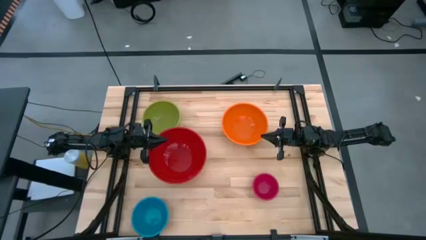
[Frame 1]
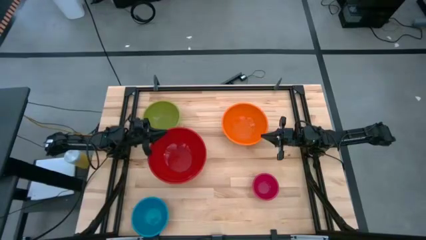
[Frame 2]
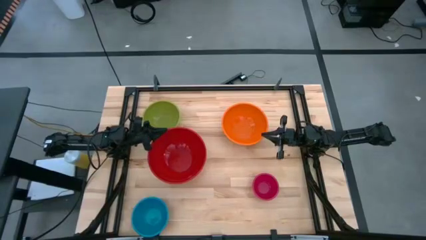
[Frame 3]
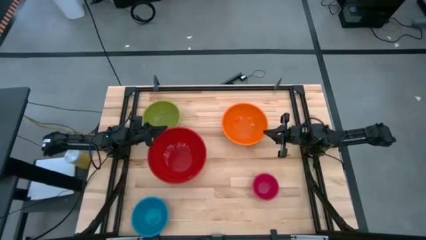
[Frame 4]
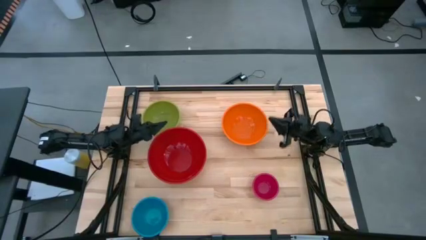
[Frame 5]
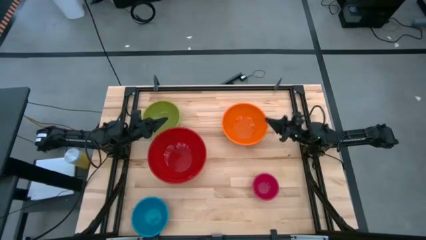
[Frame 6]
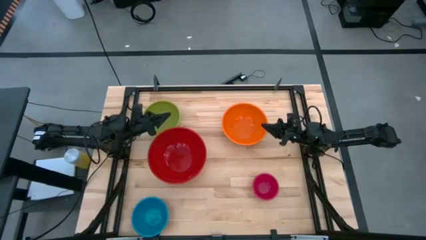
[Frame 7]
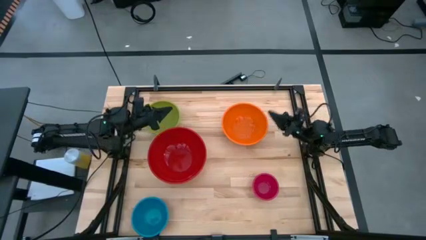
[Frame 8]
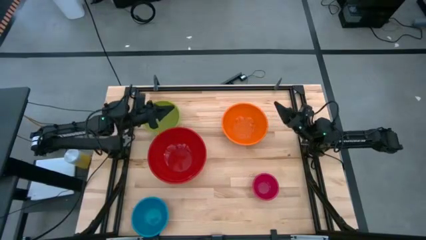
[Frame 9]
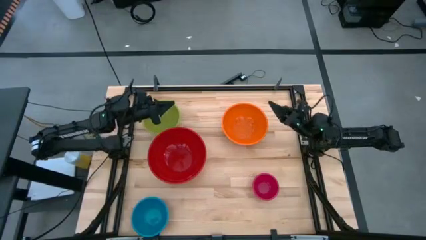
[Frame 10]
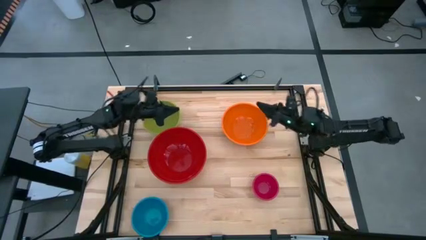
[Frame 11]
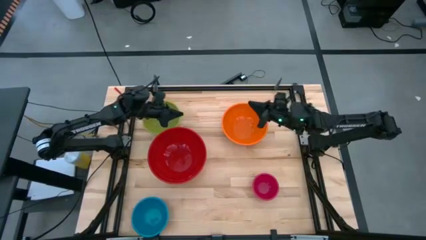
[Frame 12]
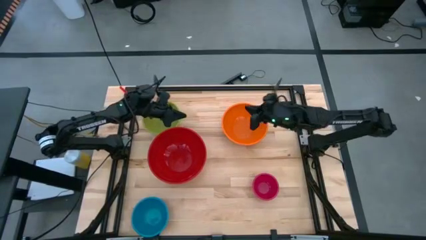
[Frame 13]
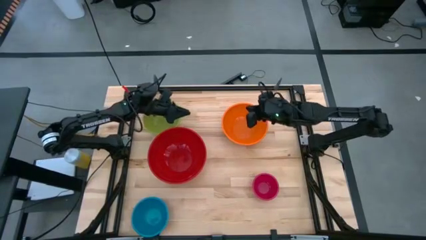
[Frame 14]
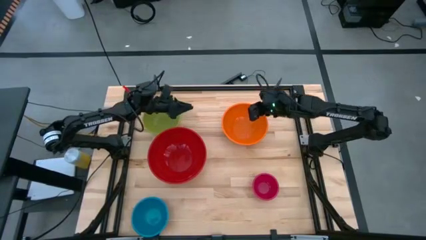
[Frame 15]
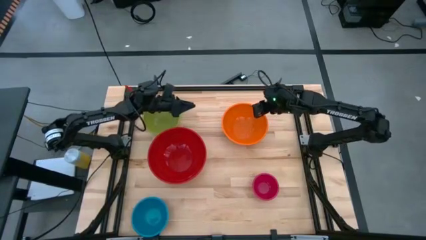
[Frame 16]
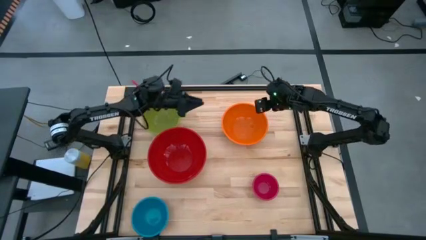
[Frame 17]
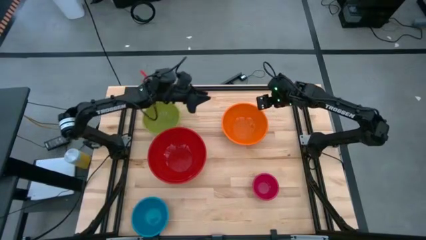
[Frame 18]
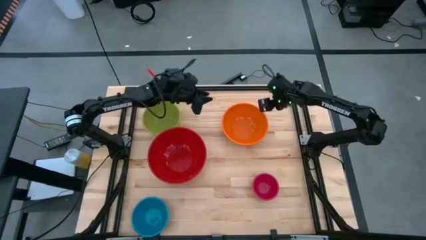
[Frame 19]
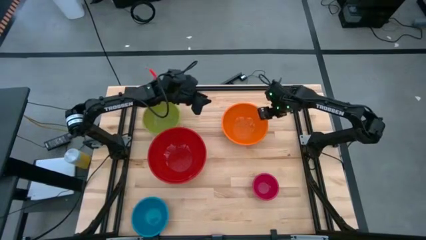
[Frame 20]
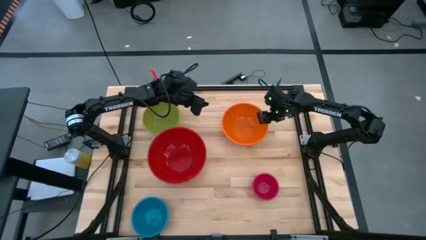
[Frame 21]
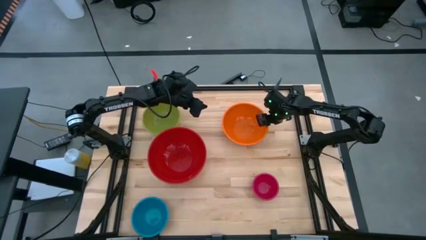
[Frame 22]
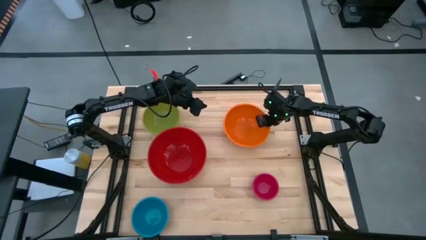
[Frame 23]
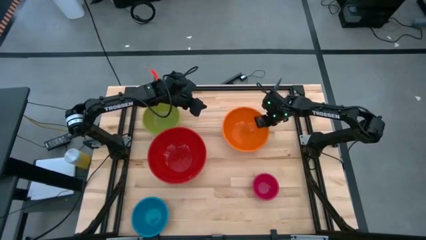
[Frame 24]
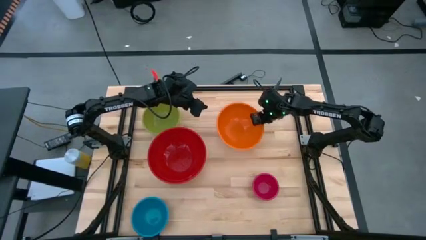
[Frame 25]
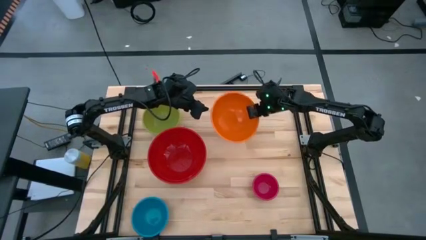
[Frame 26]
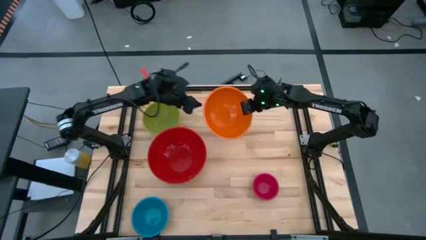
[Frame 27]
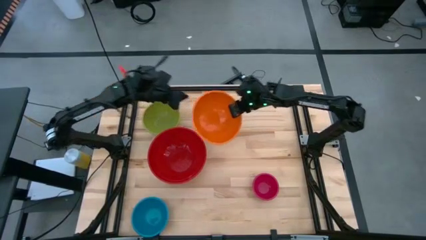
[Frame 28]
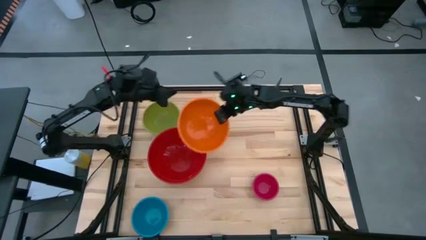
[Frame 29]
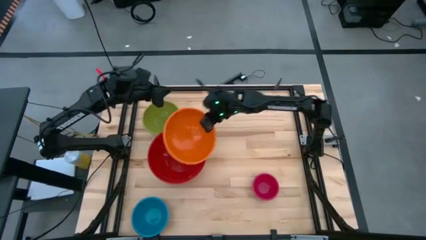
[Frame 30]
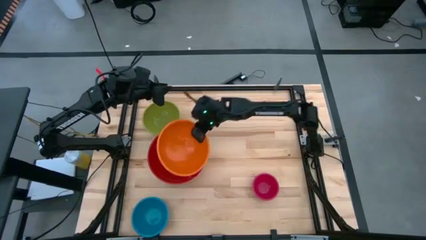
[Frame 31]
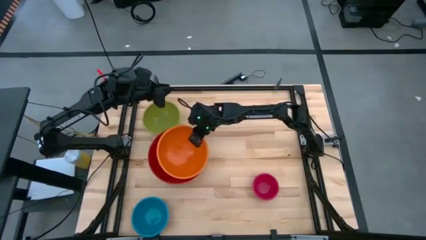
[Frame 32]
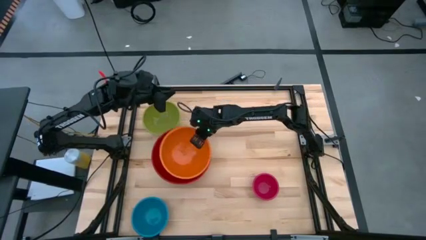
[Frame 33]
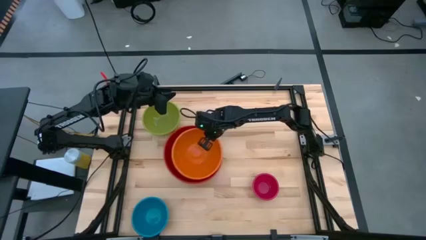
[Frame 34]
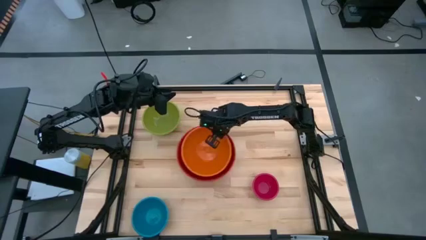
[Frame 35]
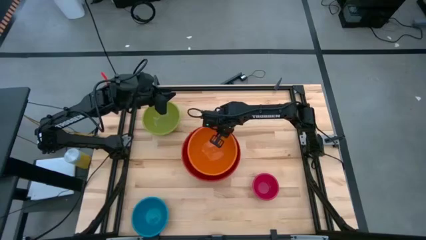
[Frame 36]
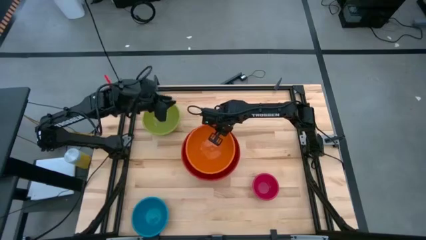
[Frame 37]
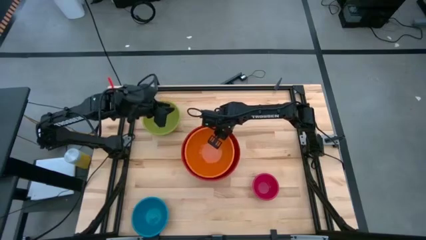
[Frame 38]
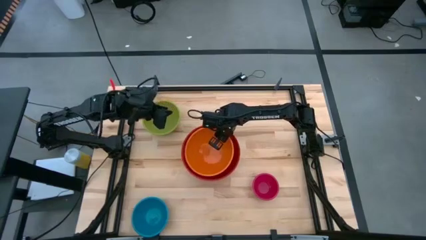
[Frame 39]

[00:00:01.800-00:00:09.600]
Stack the orange bowl on top of the red bowl

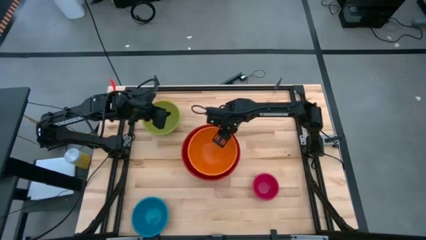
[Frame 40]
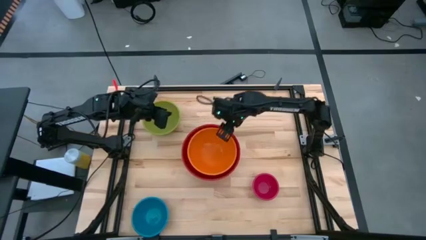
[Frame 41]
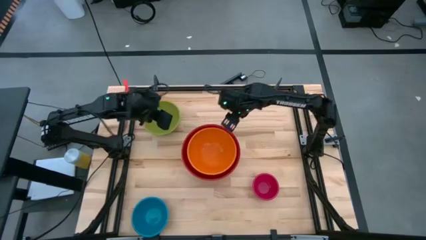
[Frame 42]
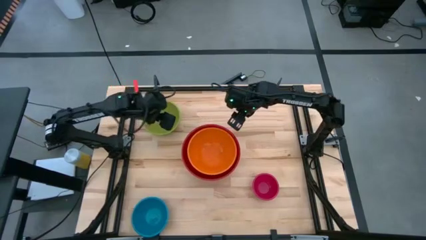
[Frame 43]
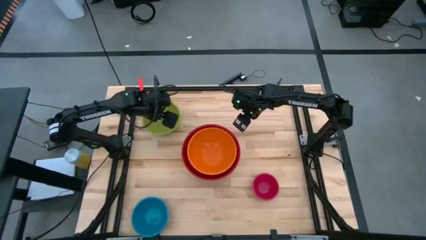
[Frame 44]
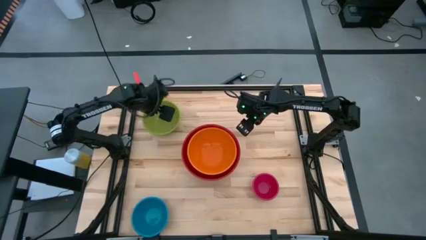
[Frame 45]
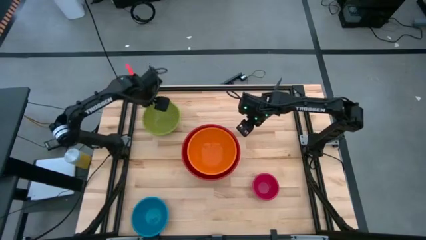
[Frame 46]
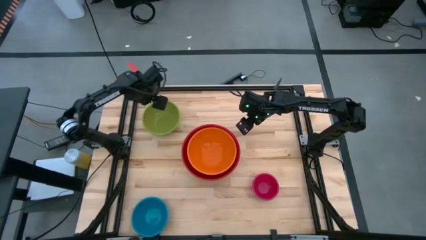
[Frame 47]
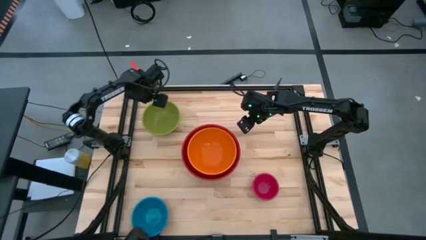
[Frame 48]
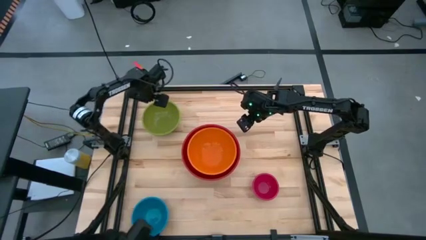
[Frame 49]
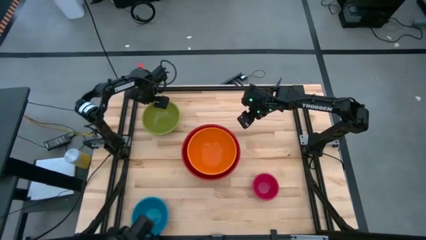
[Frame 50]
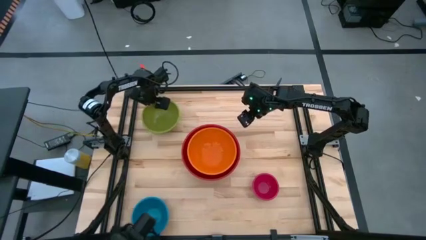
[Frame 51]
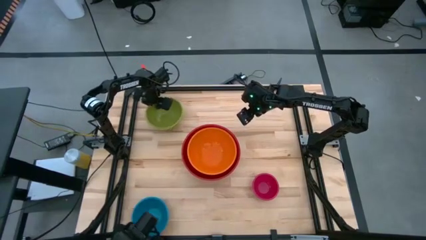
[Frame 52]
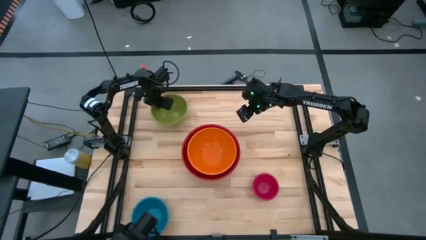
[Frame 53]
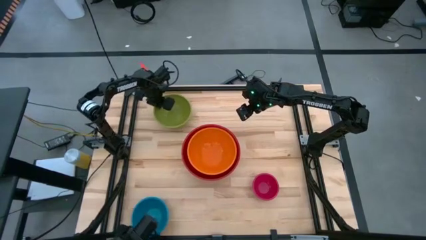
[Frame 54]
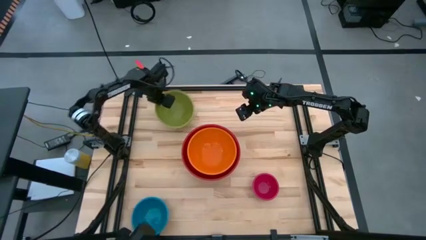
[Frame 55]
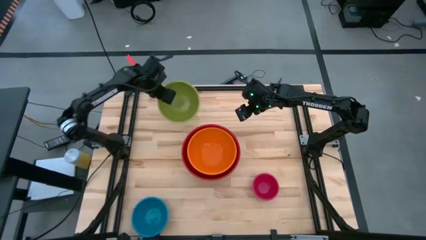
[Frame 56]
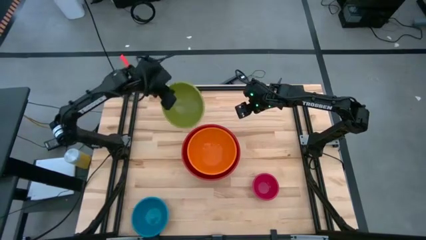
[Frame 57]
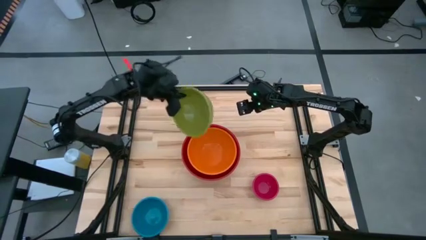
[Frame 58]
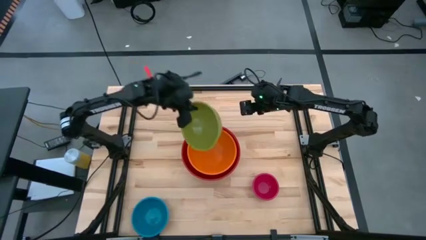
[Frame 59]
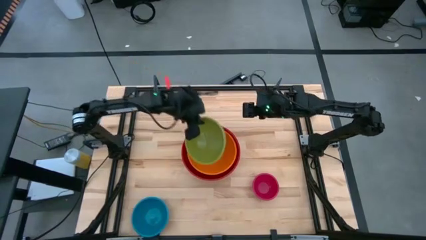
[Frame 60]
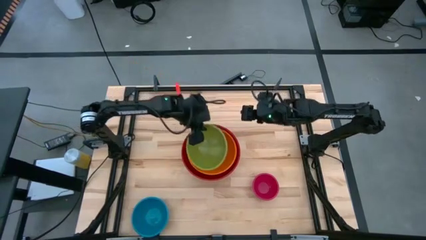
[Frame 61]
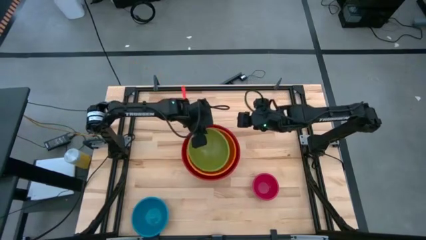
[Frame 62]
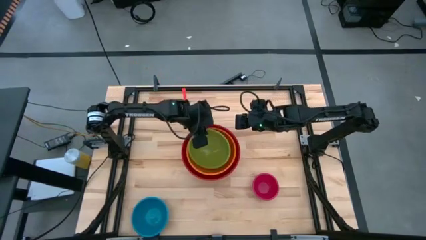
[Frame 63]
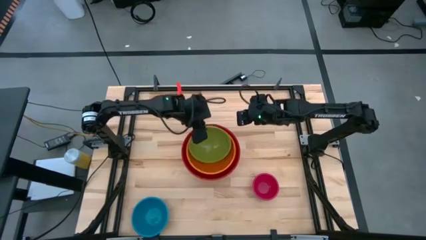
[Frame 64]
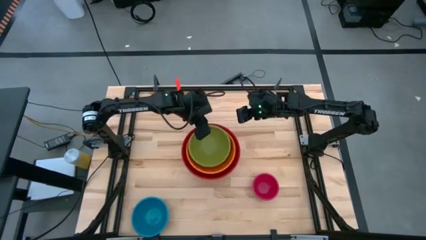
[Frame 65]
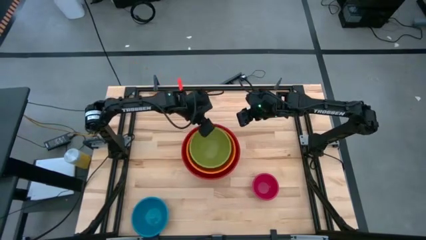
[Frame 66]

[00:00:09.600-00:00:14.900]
Stack the green bowl on top of the orange bowl
